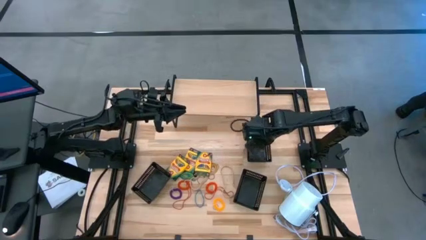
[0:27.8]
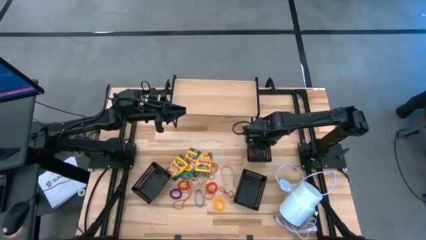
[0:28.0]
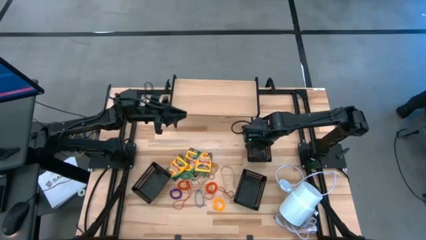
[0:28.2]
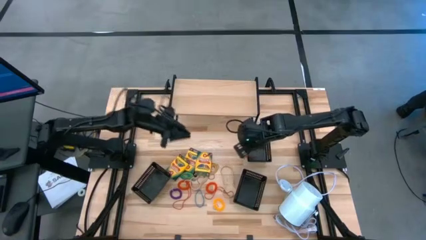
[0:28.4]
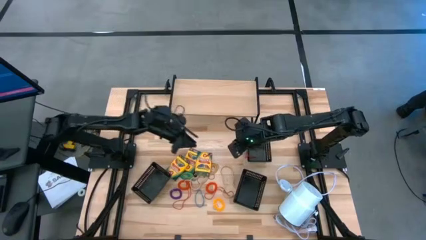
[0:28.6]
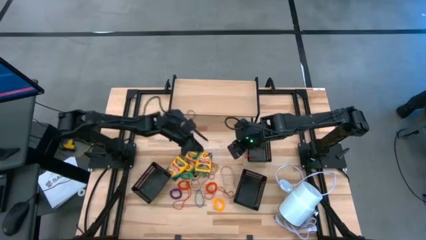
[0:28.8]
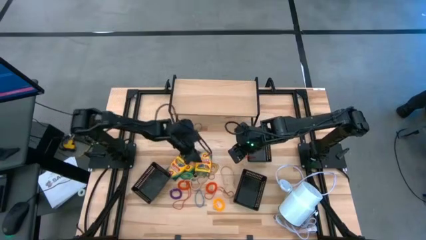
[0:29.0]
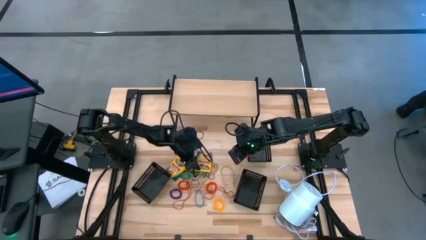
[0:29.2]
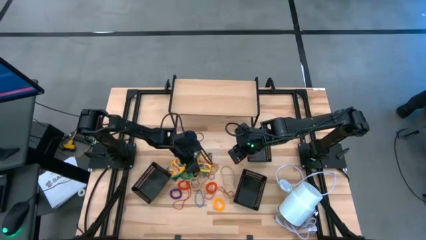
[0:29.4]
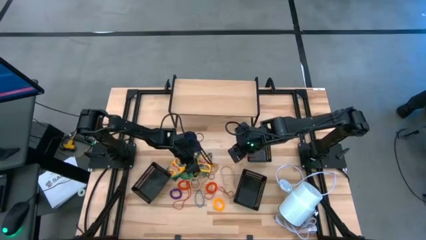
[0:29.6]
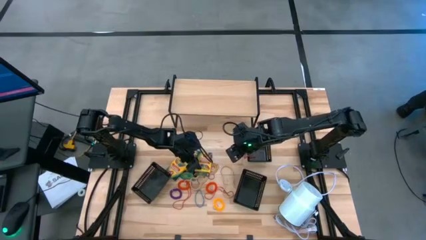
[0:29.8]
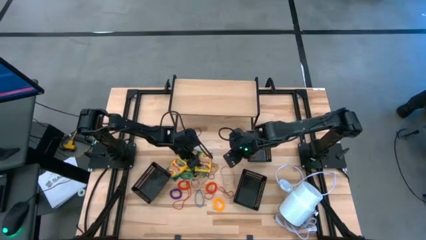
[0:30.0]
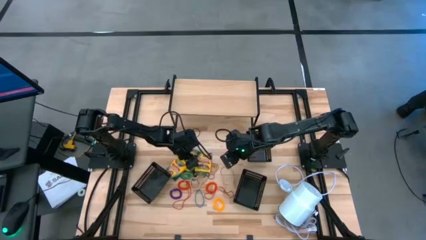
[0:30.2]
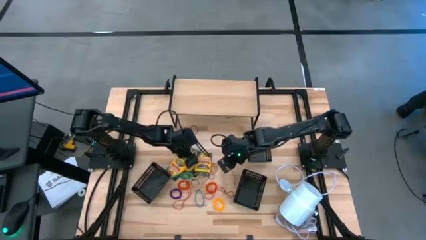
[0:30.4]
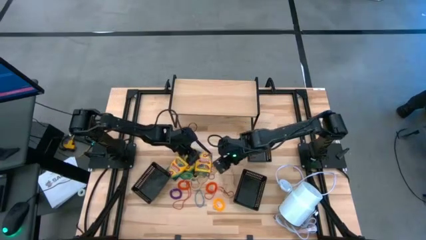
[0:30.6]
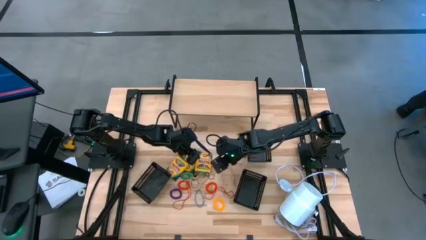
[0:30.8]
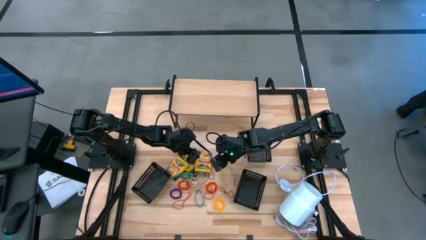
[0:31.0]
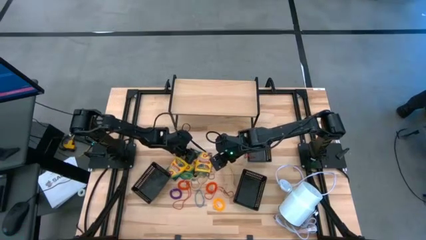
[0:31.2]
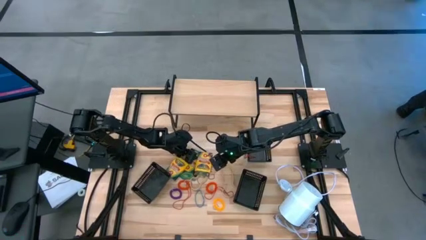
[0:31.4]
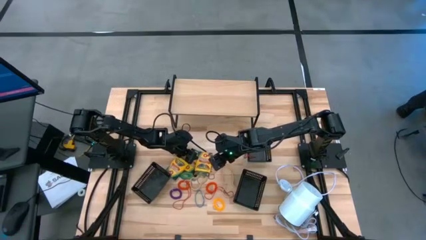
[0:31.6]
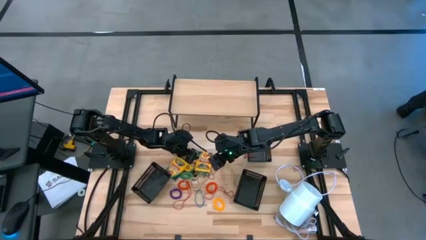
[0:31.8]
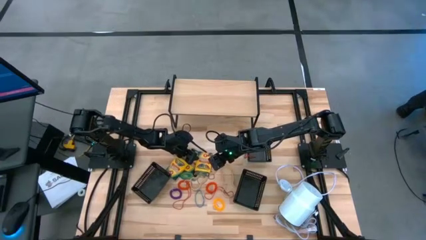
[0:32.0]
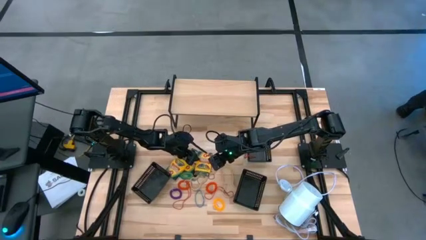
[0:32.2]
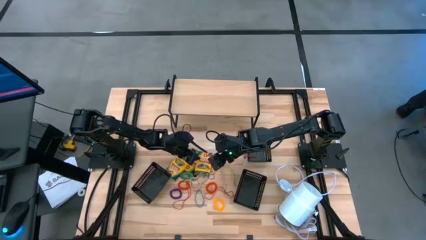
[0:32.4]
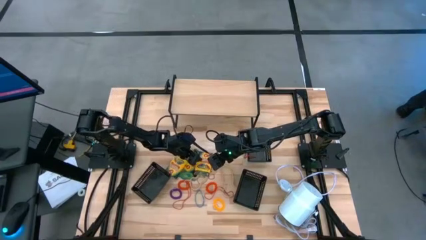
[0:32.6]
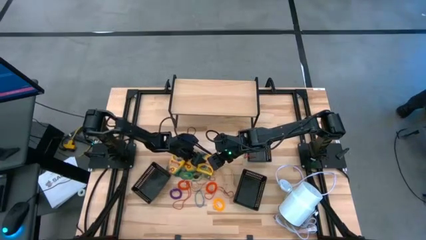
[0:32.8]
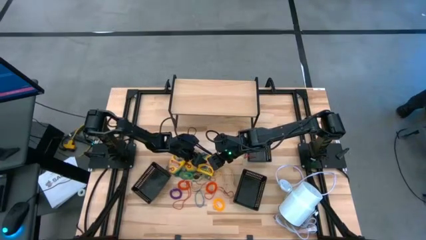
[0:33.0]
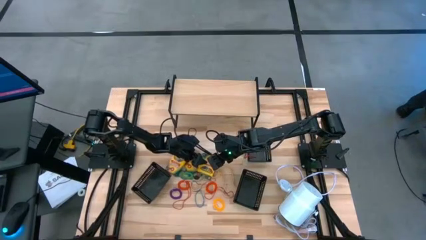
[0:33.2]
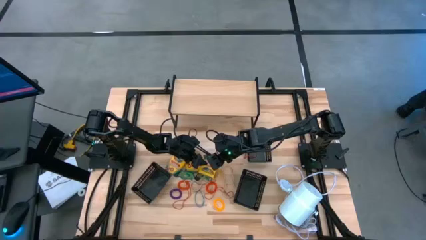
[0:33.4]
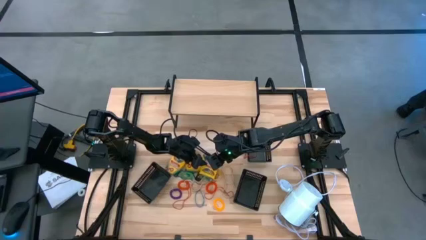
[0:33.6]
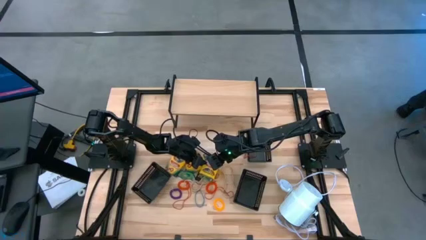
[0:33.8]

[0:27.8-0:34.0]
Task: Pick & Place Office Desk Supplies
Put the right crayon box into the bottom right black bin

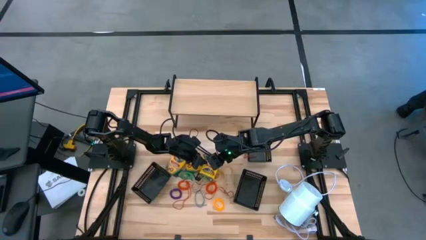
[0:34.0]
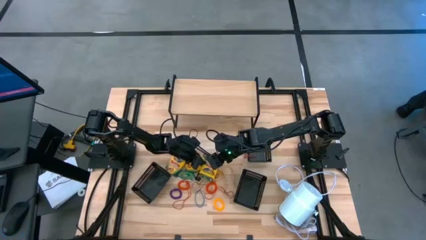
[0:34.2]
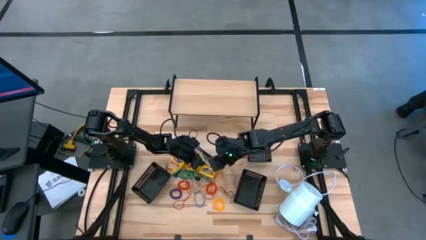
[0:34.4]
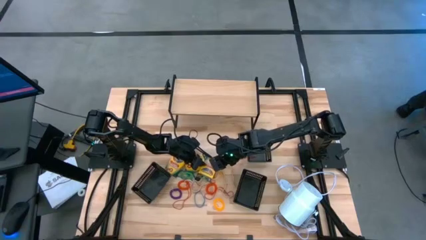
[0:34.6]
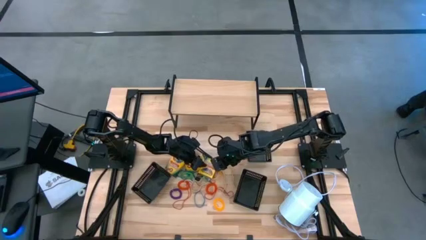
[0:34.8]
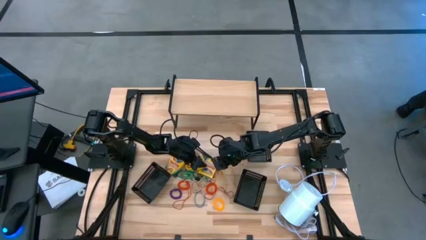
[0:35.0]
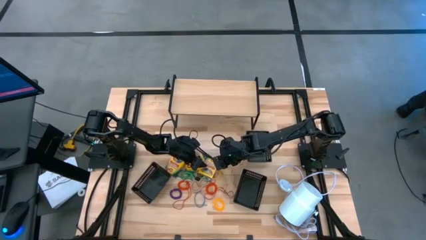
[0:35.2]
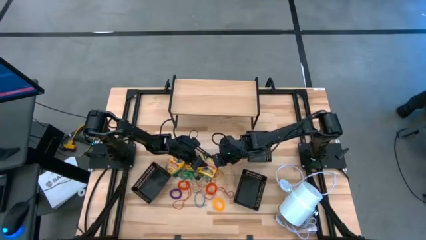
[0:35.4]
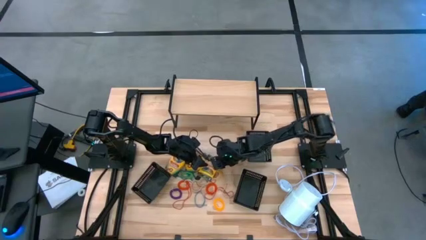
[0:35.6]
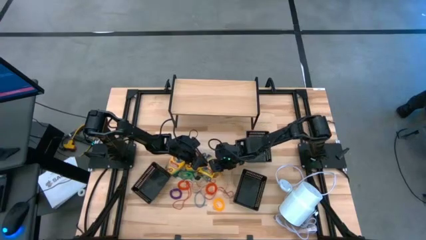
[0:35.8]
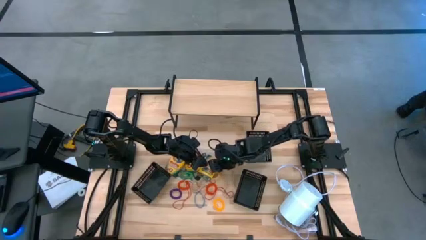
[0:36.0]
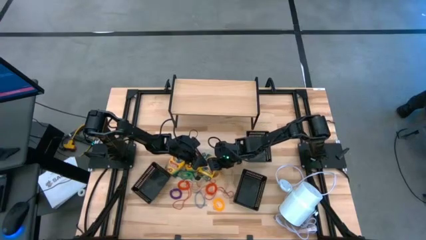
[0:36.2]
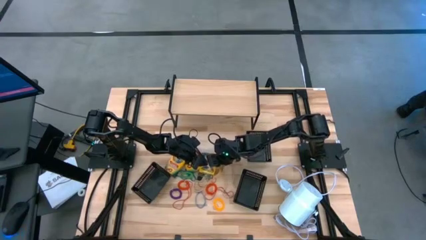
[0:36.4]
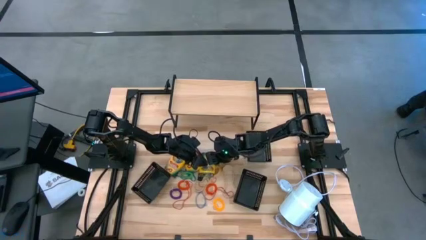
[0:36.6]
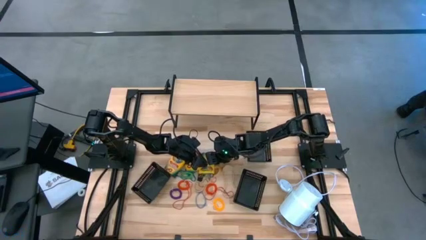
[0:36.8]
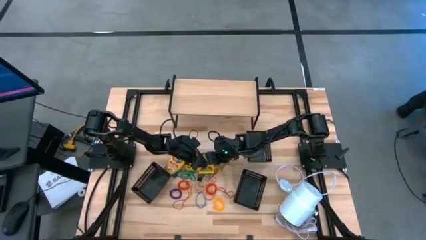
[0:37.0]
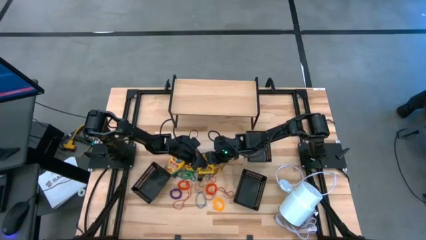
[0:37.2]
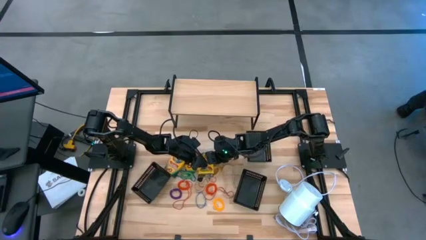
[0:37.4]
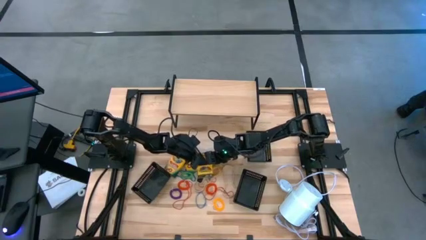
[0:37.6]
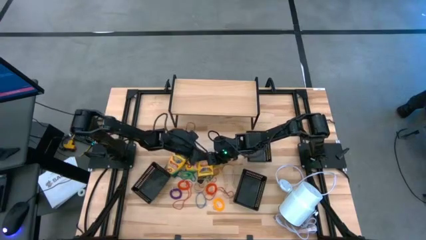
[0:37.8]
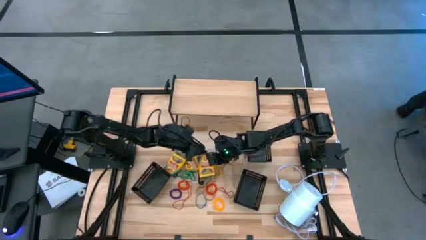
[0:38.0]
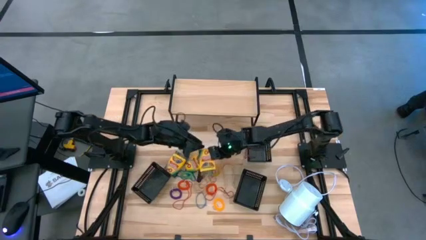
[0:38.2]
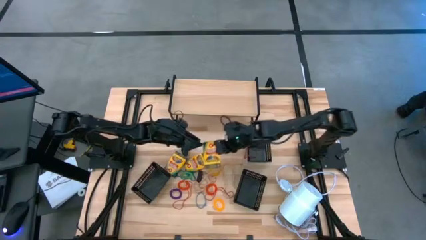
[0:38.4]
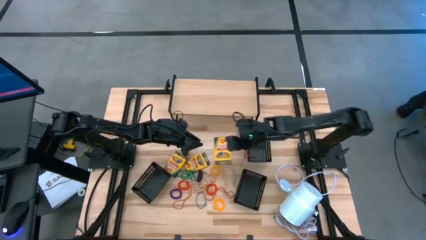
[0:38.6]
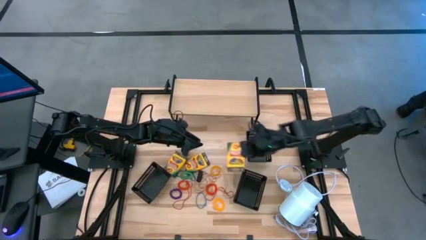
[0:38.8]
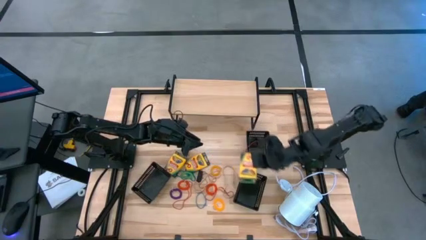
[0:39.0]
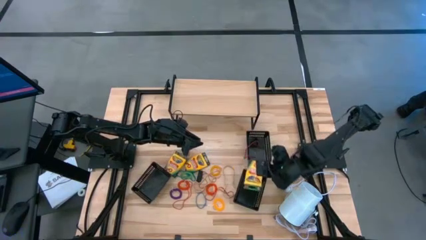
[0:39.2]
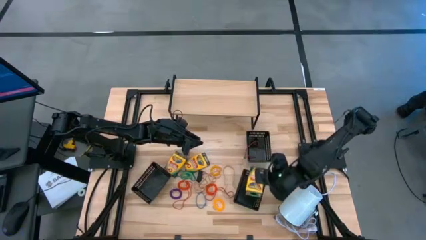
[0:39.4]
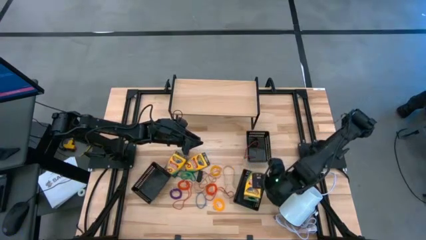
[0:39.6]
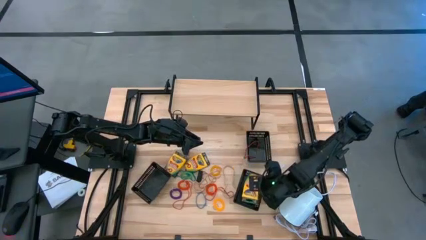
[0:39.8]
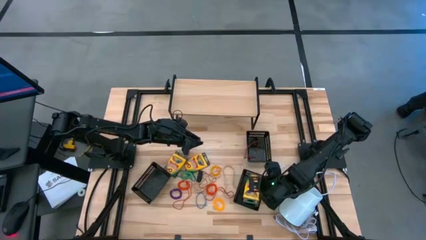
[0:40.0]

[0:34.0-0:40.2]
Put the right crayon box into the bottom right black bin

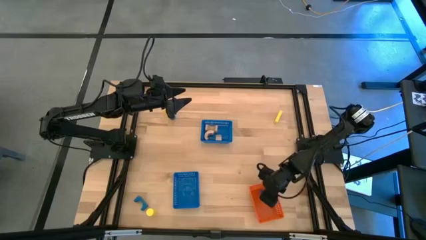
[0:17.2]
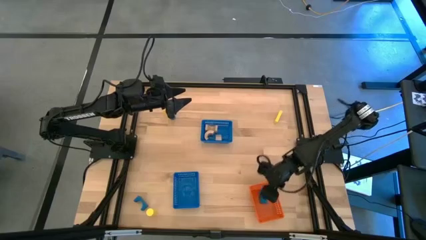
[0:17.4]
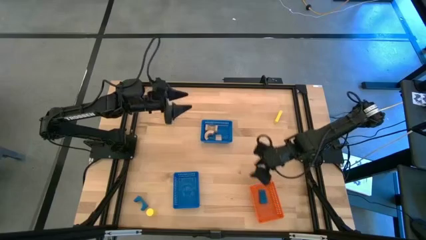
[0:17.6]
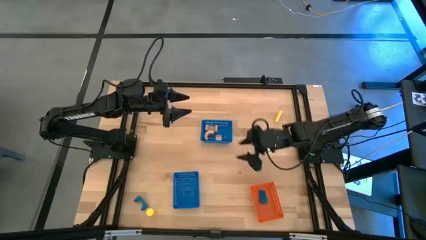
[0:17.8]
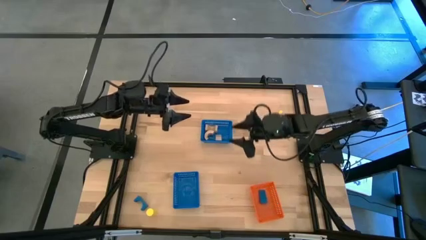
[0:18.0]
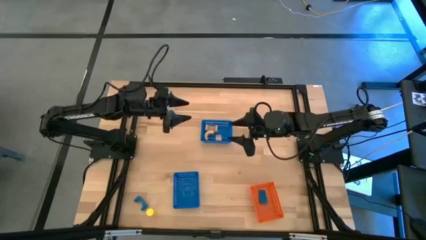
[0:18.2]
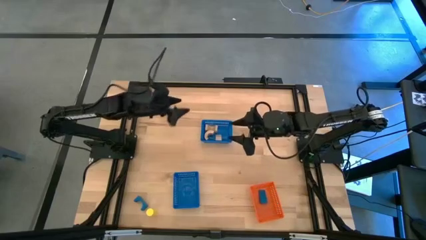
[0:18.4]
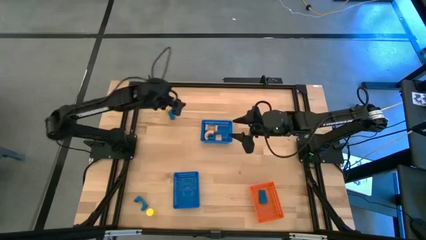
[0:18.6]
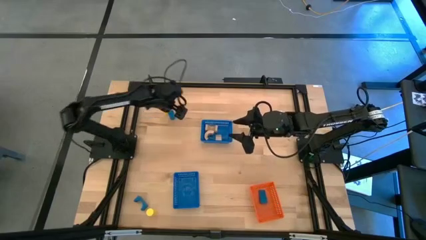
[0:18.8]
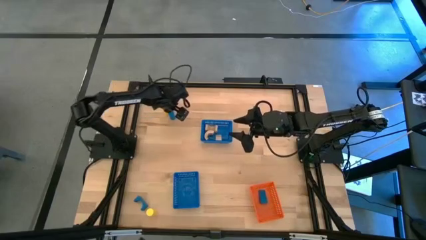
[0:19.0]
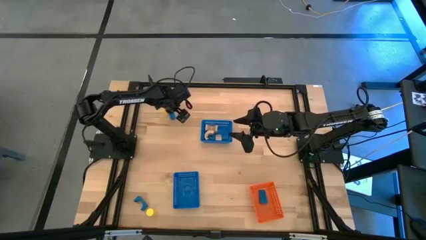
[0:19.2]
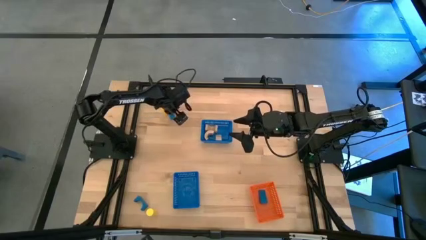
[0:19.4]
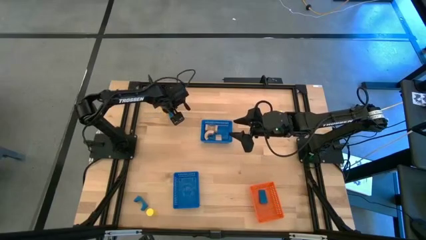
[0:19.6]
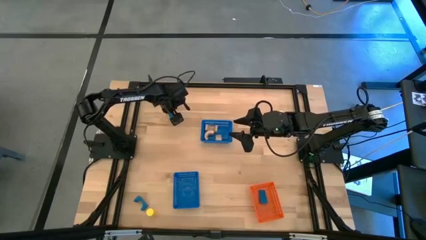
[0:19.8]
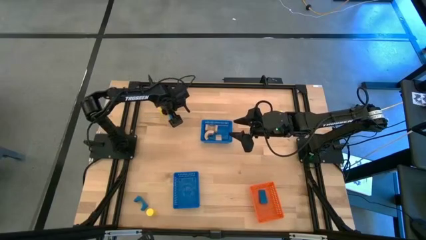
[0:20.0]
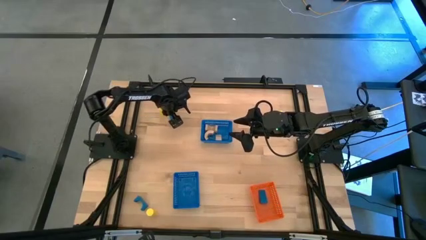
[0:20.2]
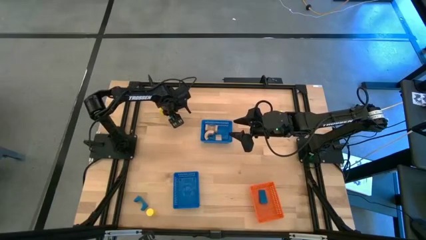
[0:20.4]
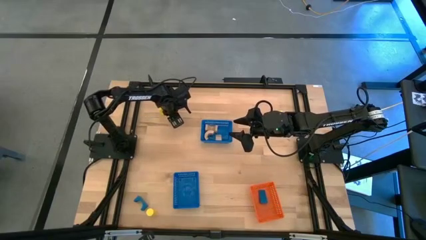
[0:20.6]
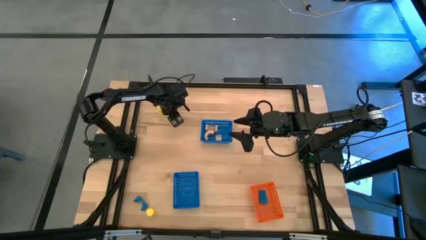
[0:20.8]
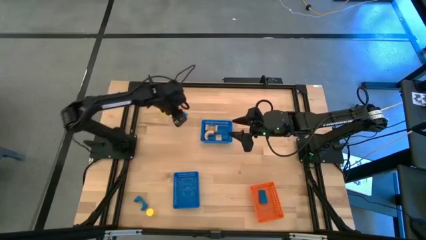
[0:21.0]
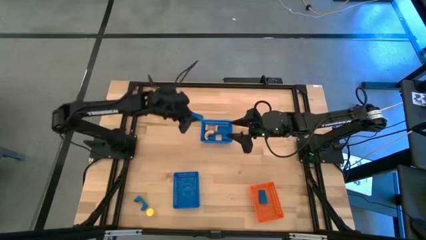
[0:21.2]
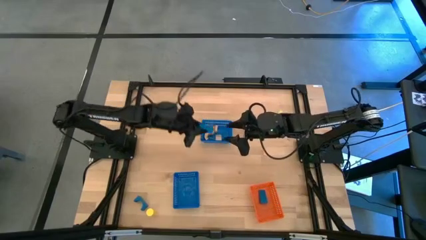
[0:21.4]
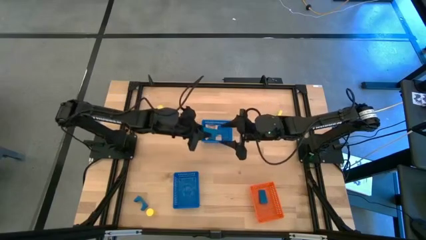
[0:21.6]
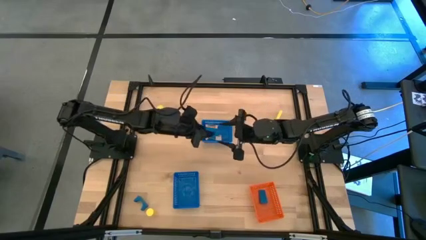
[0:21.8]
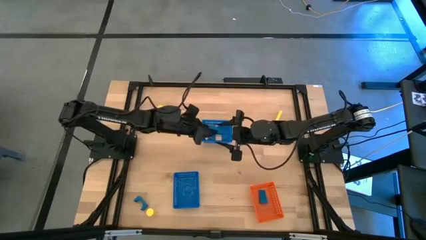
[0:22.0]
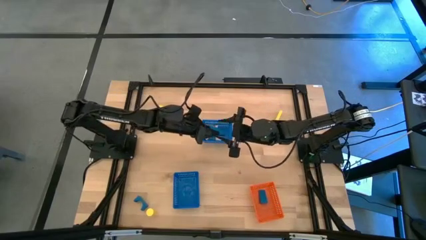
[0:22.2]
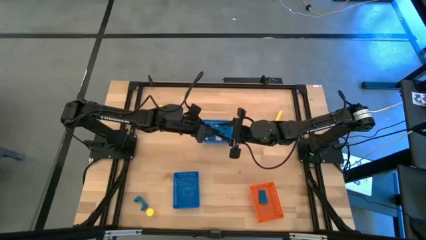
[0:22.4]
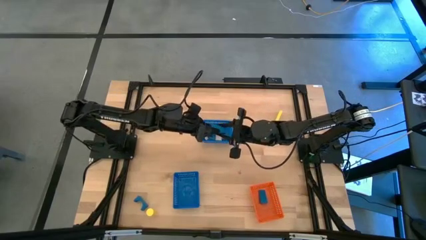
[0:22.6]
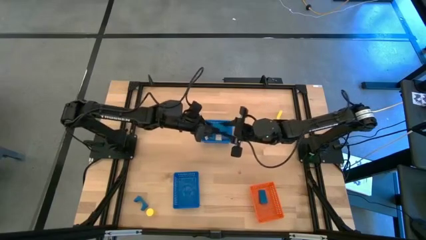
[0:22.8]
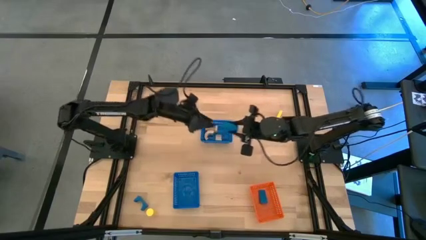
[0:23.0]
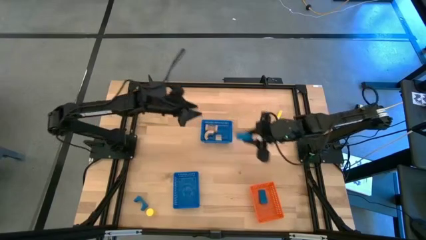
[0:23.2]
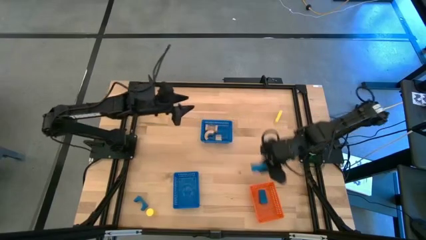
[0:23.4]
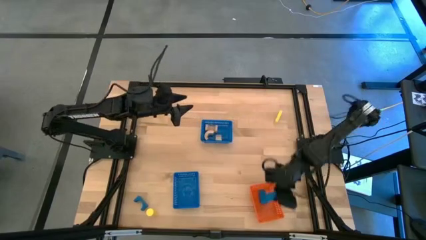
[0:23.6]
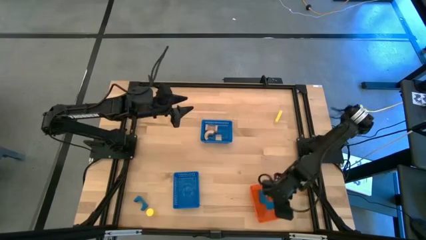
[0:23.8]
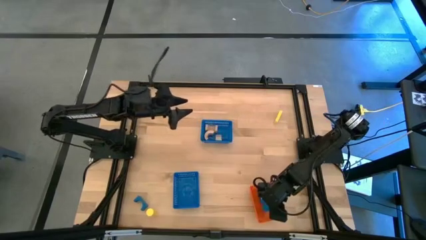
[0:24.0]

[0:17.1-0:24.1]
Task: Sort & place blocks by color
Put the top blue block into the orange basket
